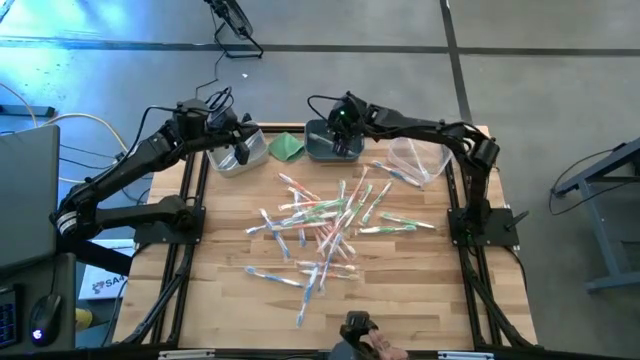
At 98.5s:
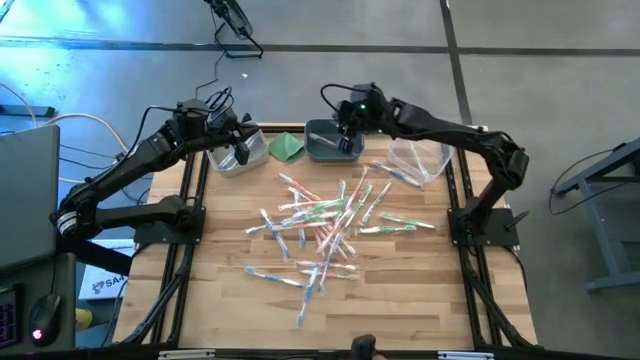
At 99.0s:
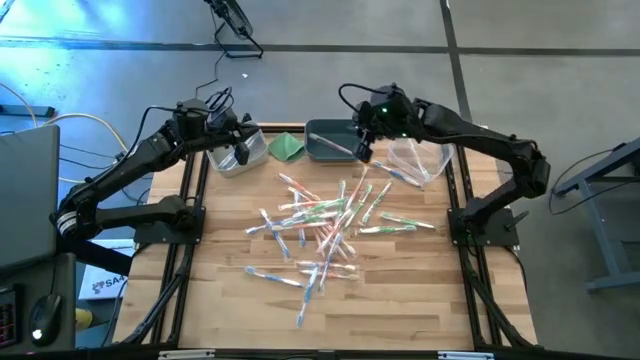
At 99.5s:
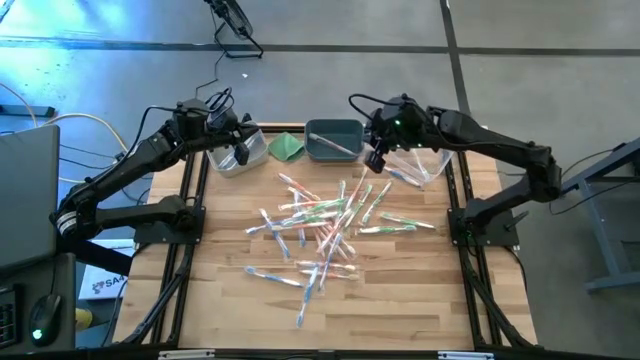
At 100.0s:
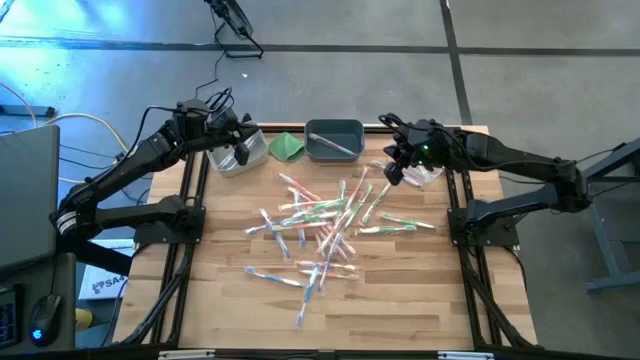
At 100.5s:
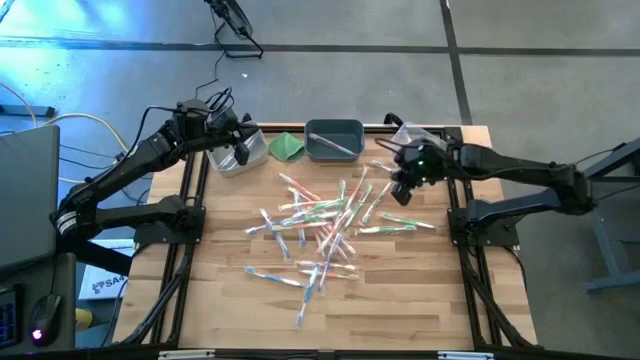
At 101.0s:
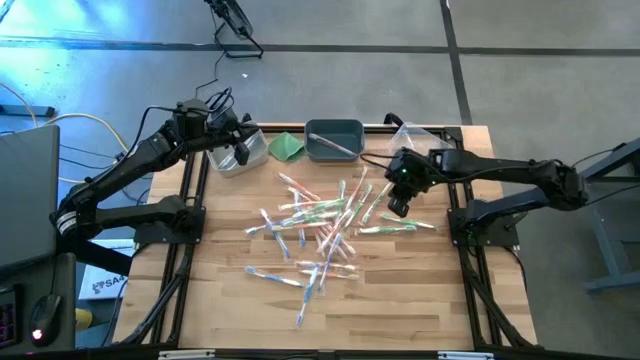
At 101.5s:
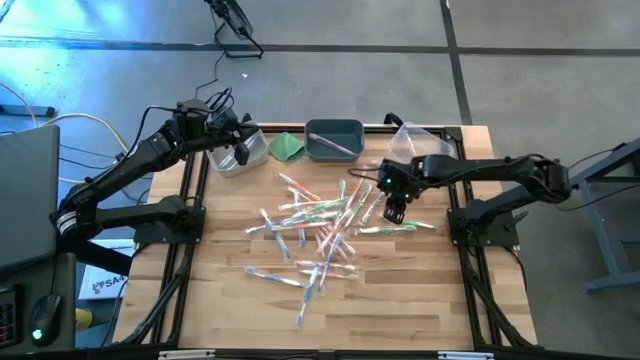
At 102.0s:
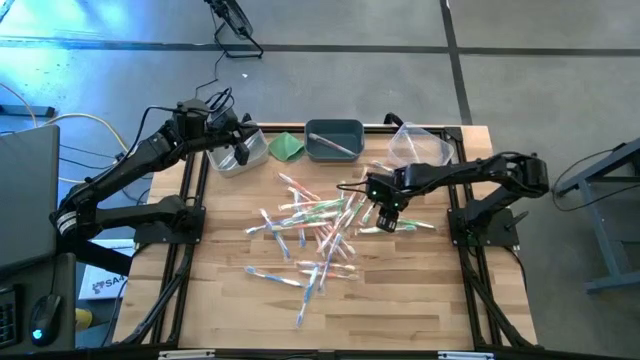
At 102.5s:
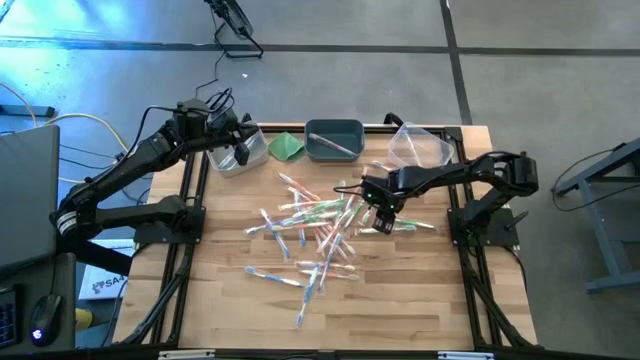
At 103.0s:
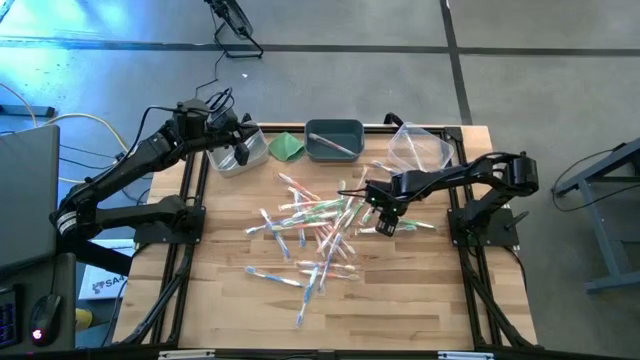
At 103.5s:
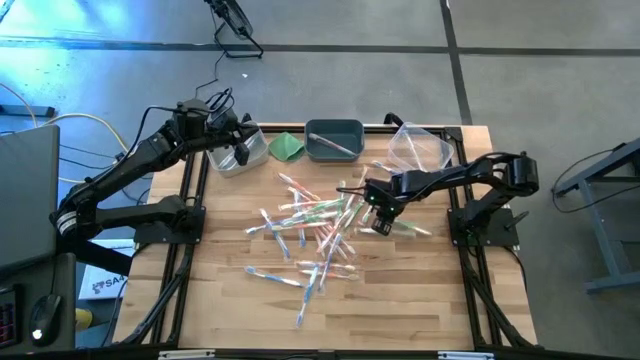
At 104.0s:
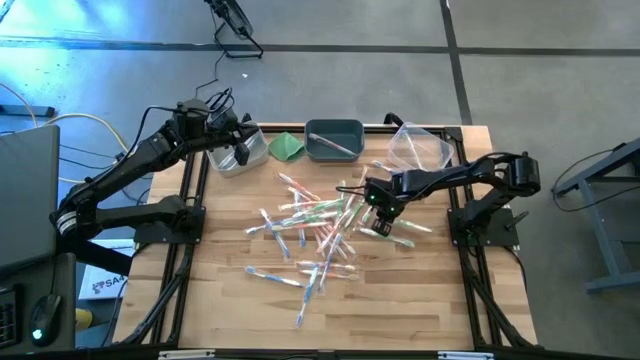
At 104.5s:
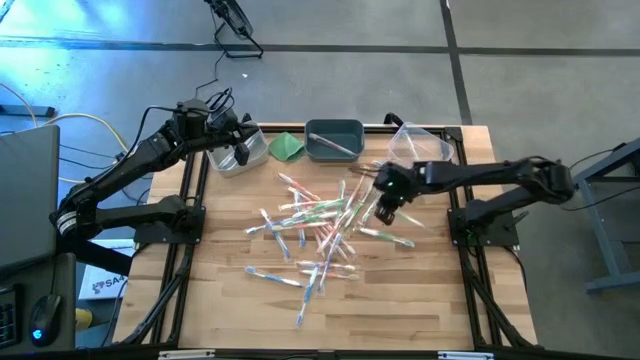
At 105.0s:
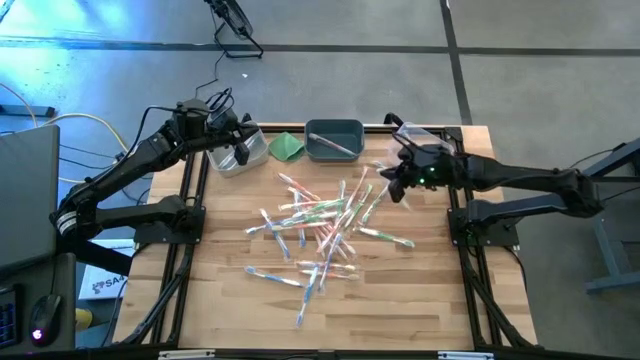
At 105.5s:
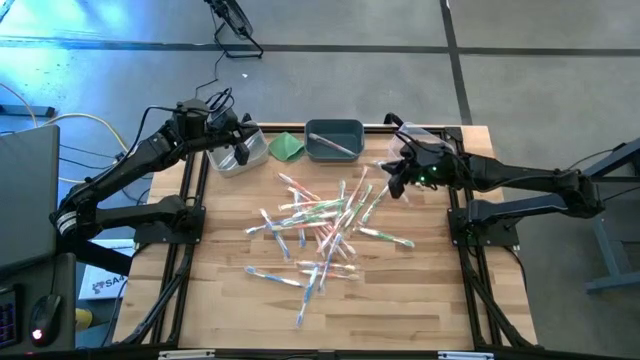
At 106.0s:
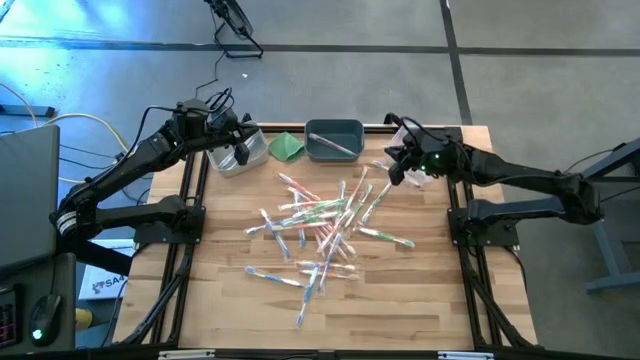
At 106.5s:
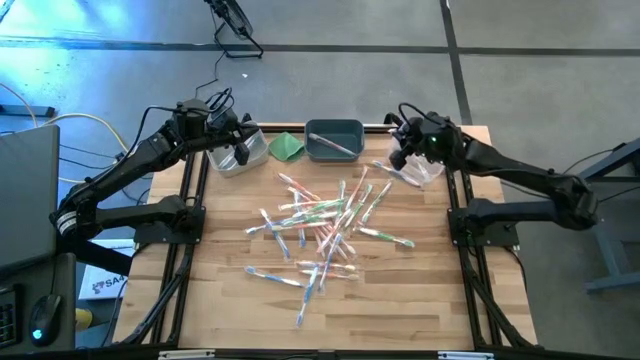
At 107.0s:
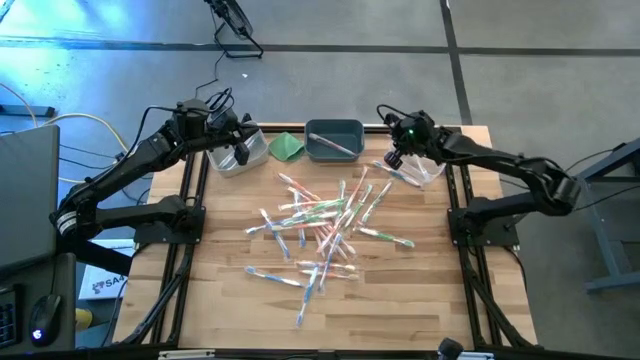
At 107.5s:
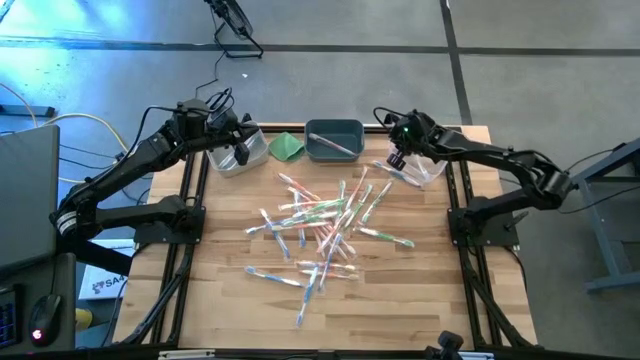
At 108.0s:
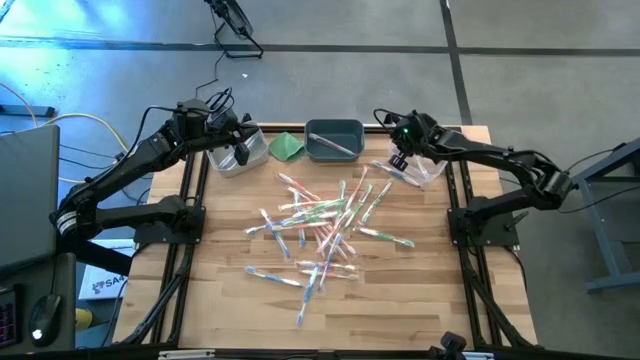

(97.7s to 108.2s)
Task: Pick & Place Toothbrushes
Put the green toothbrush into the transparent bin

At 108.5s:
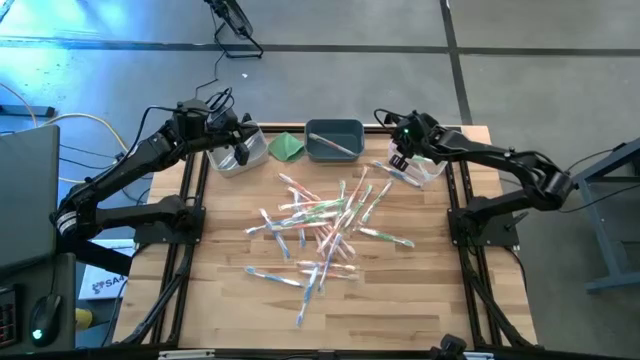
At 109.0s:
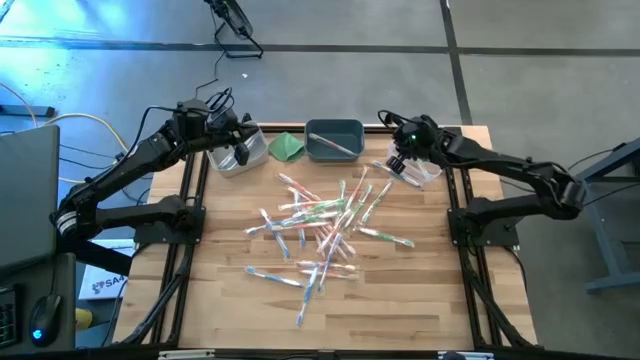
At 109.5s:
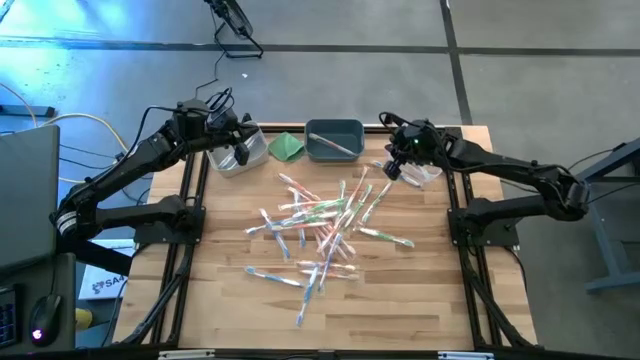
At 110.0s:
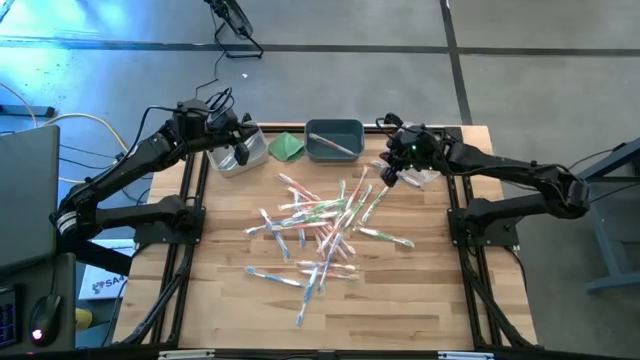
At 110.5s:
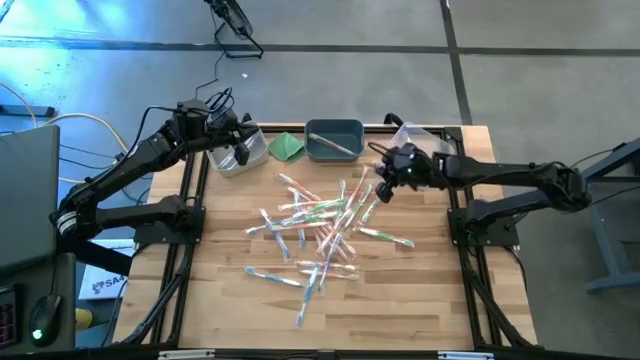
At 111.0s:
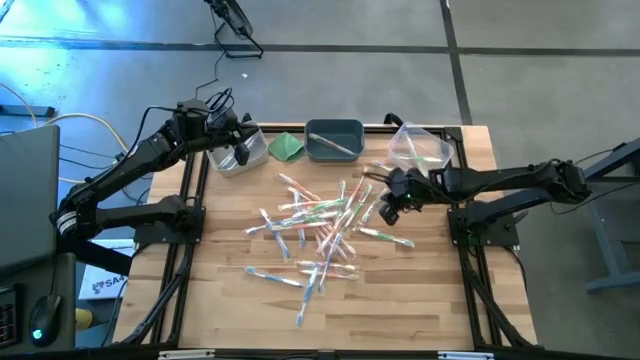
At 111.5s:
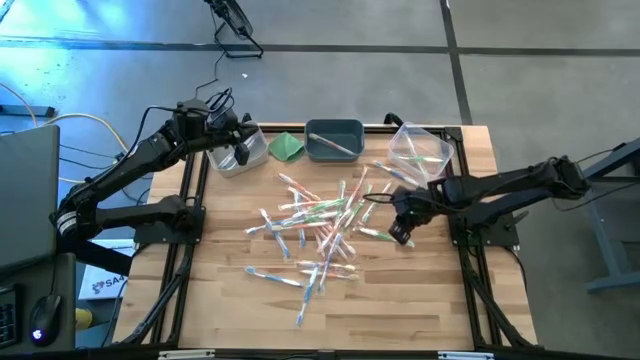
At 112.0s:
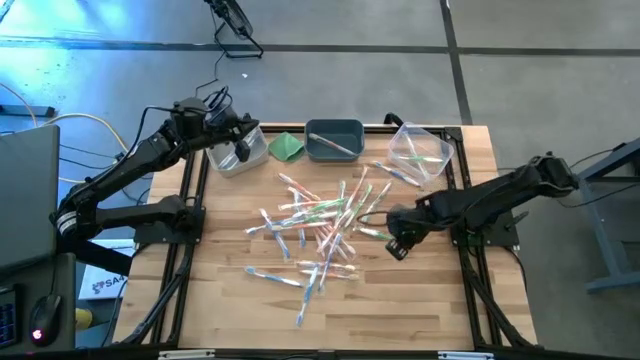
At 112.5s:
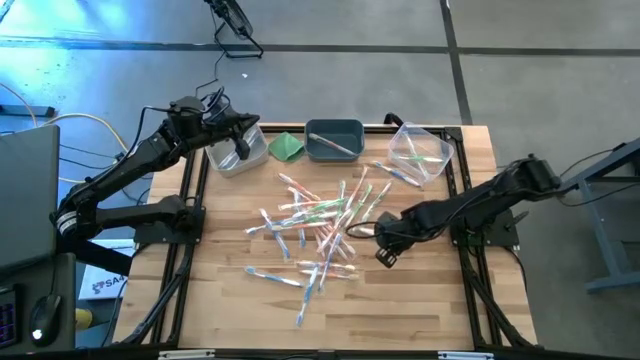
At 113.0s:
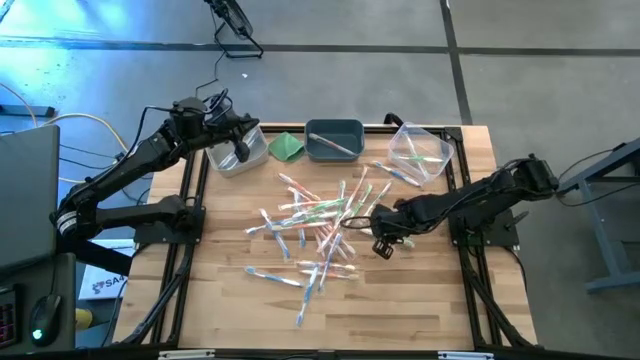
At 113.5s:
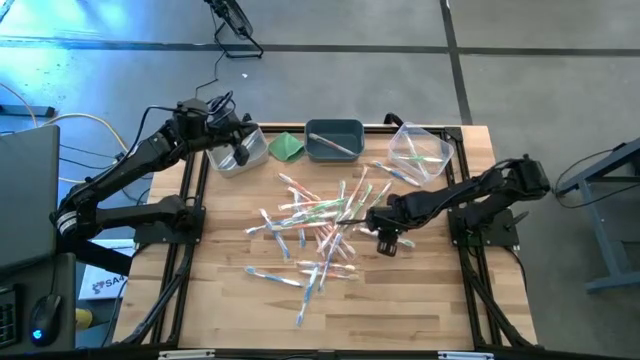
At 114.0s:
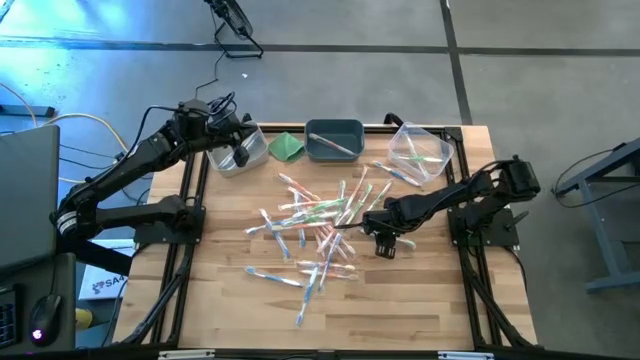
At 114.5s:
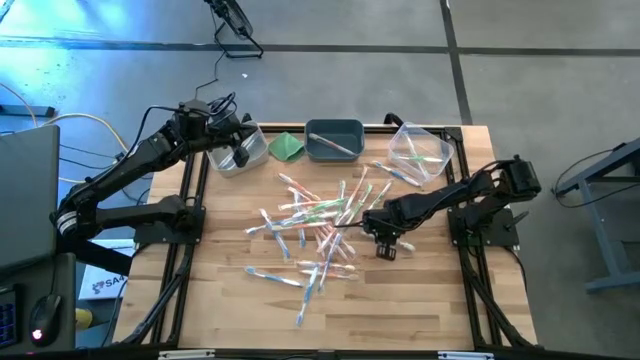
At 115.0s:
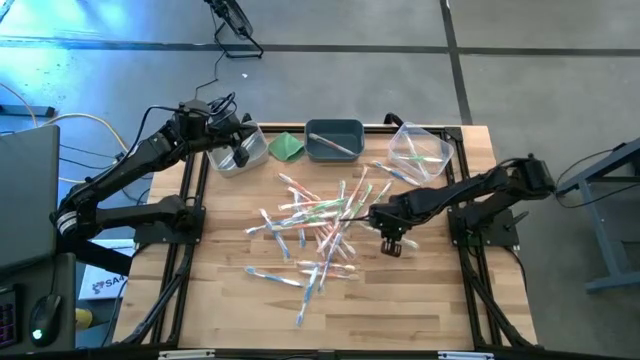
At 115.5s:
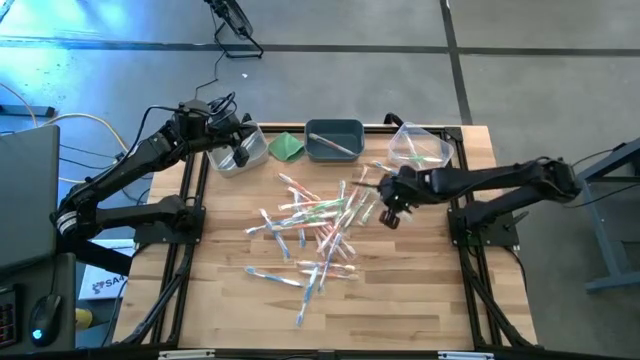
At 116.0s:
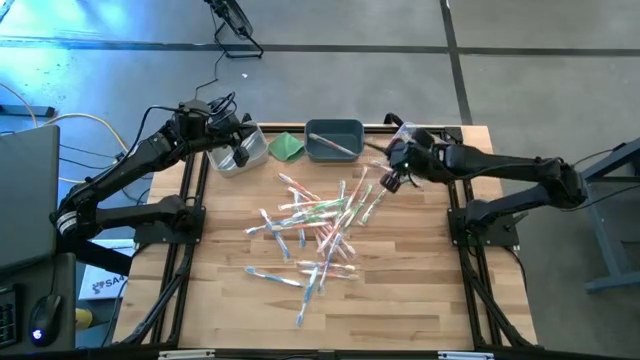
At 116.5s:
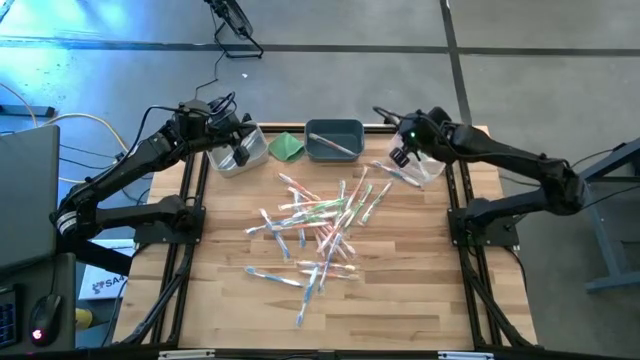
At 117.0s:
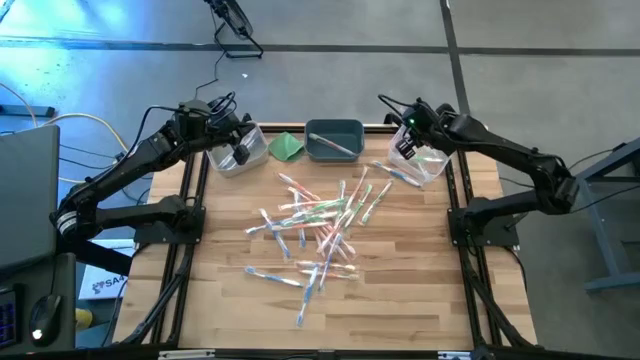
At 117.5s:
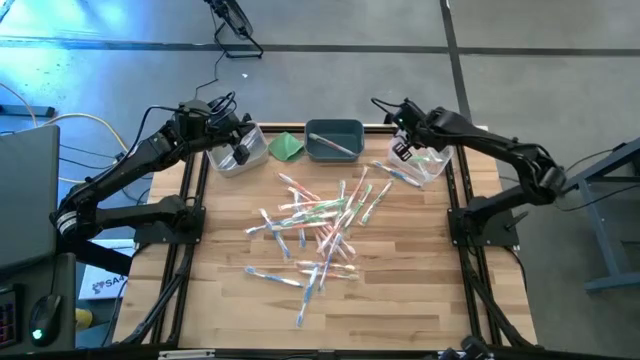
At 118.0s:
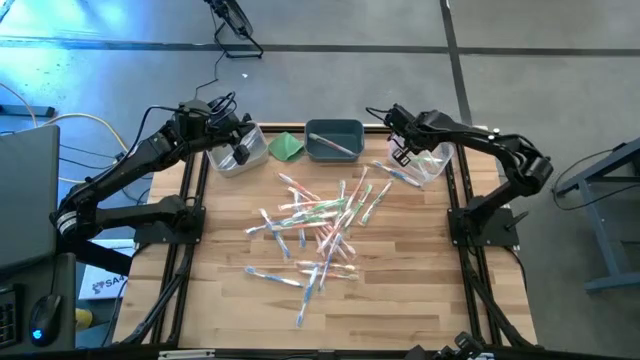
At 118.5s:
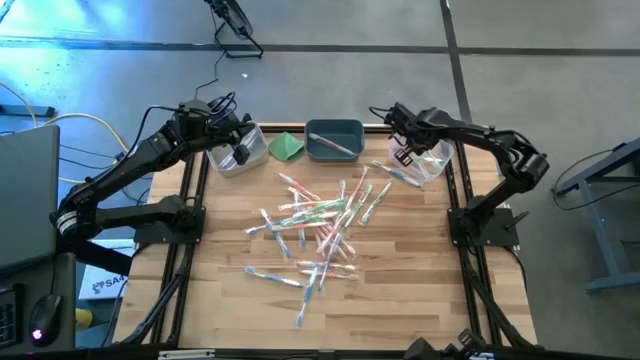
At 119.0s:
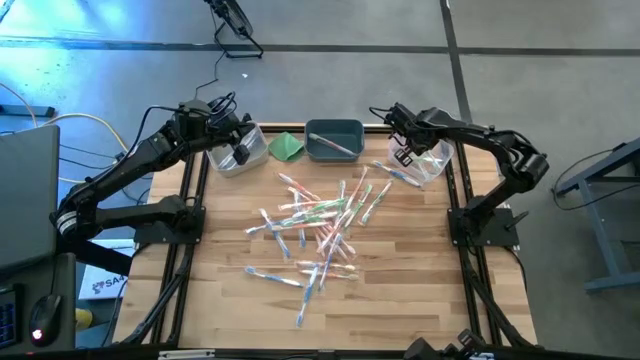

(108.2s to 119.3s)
Put the green toothbrush into the transparent bin
